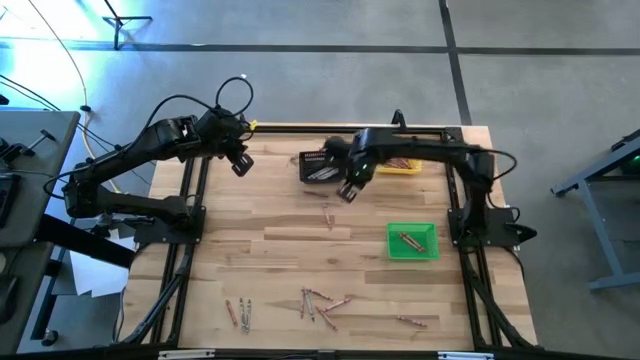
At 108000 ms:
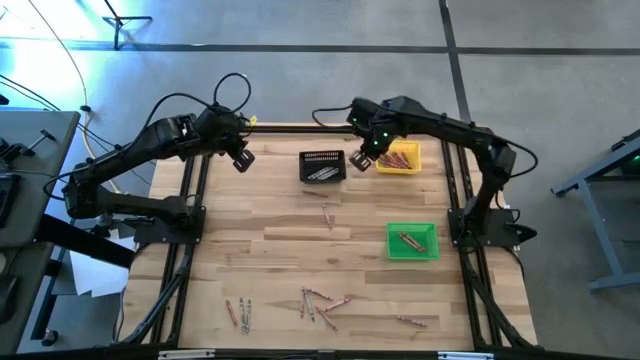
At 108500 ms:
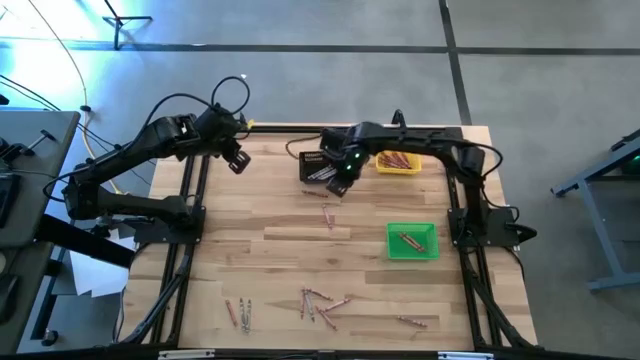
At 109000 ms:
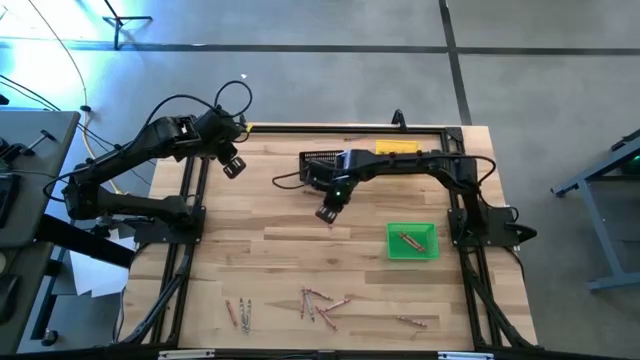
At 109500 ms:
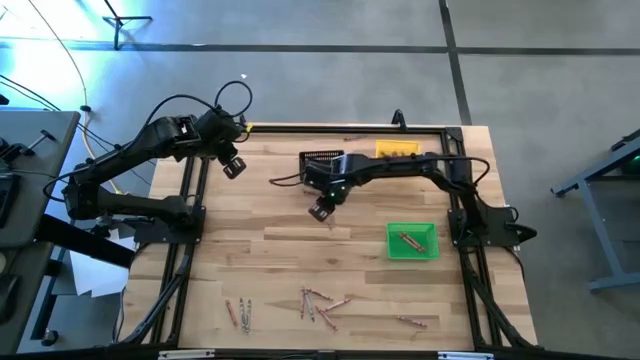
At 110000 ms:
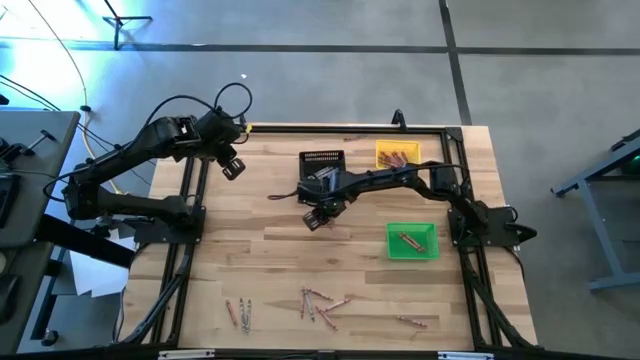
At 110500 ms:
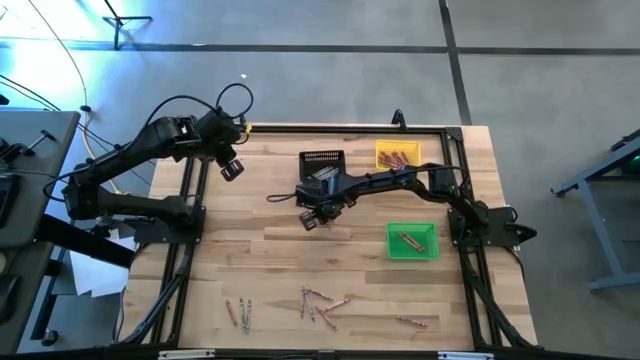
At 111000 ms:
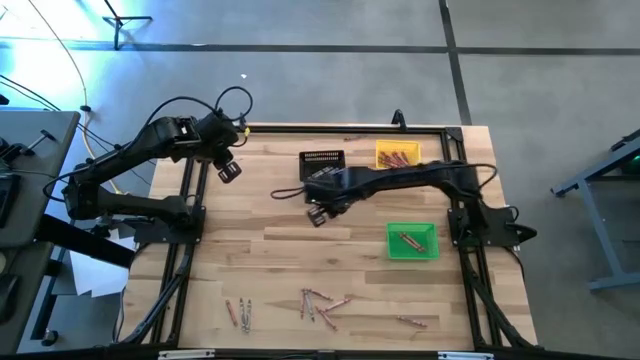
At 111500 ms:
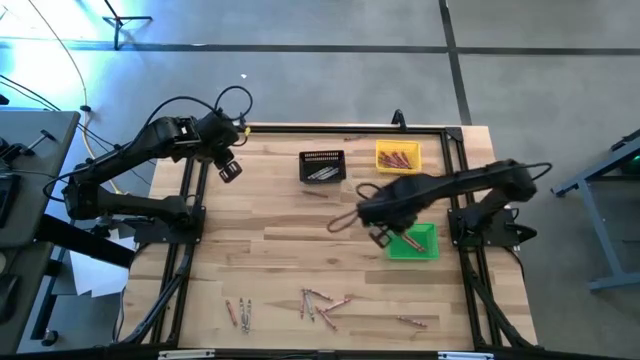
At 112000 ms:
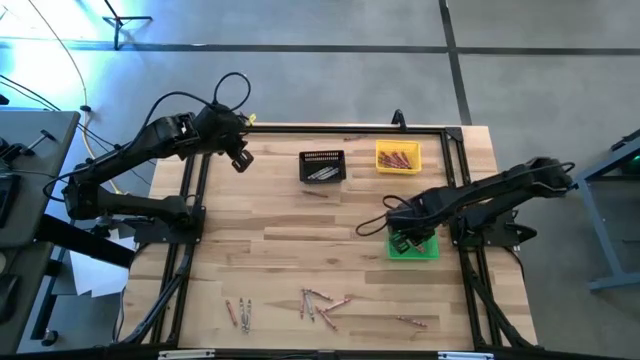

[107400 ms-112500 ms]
Task: Sort crayons
Put the pink crayon into the green basket

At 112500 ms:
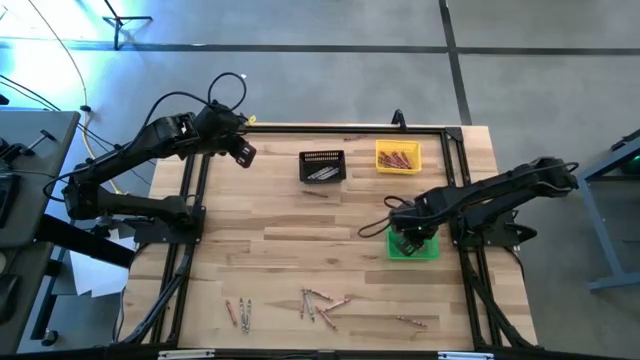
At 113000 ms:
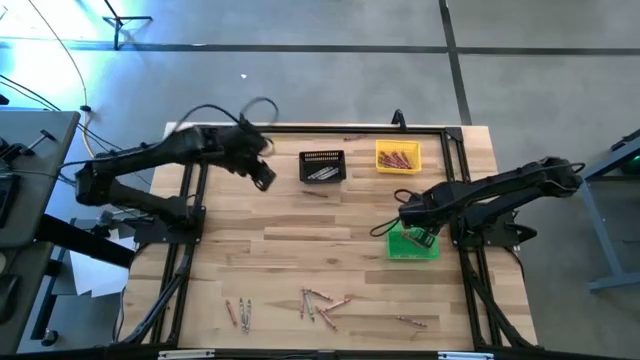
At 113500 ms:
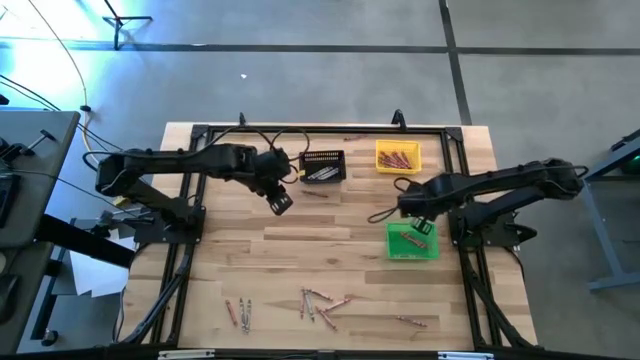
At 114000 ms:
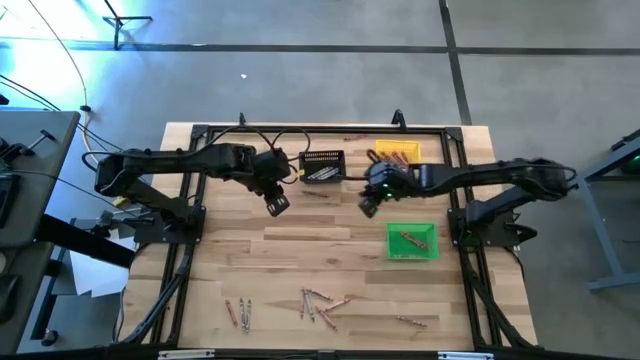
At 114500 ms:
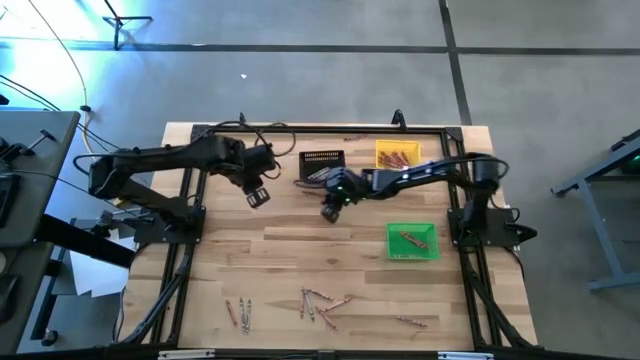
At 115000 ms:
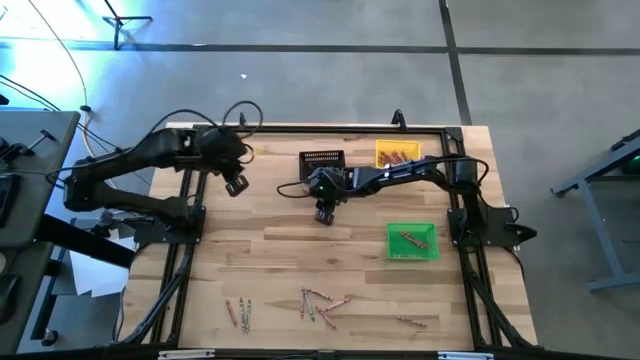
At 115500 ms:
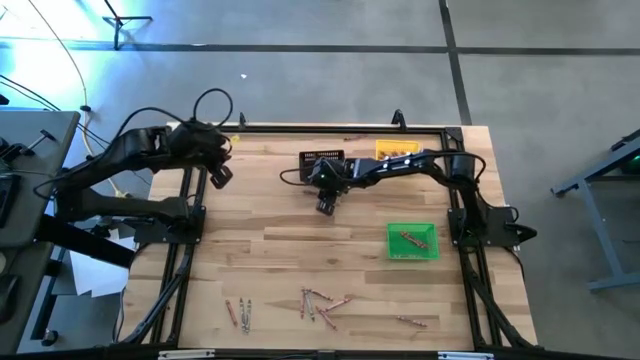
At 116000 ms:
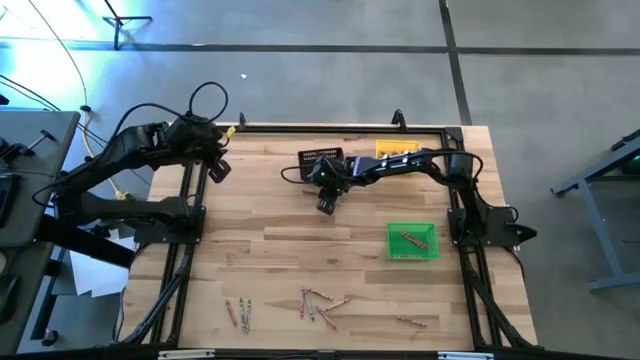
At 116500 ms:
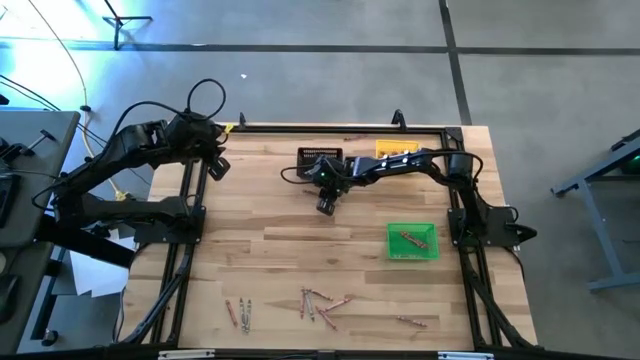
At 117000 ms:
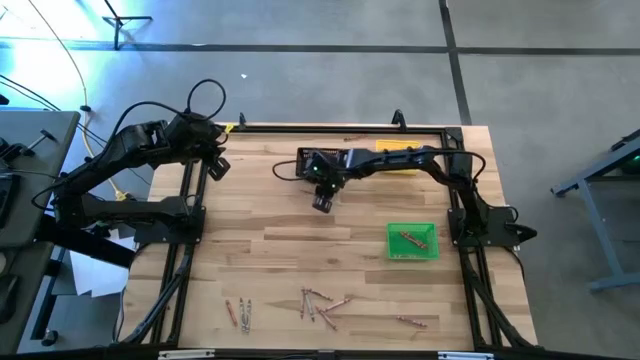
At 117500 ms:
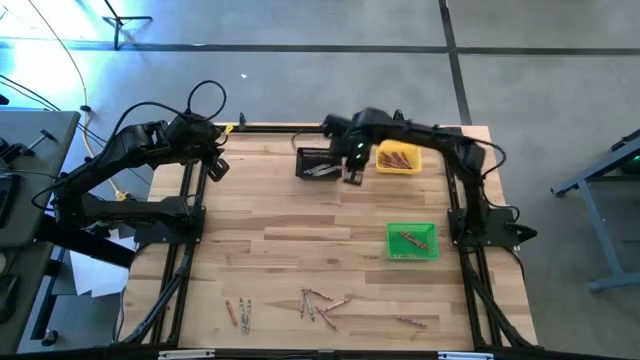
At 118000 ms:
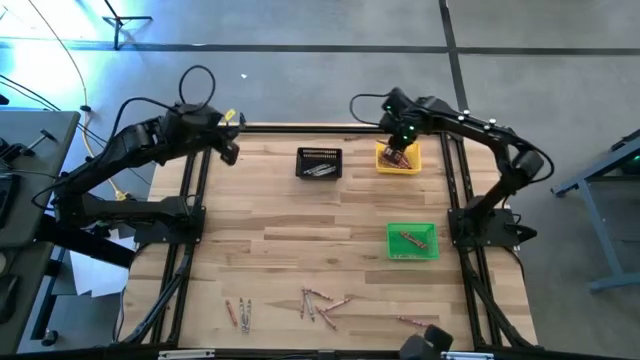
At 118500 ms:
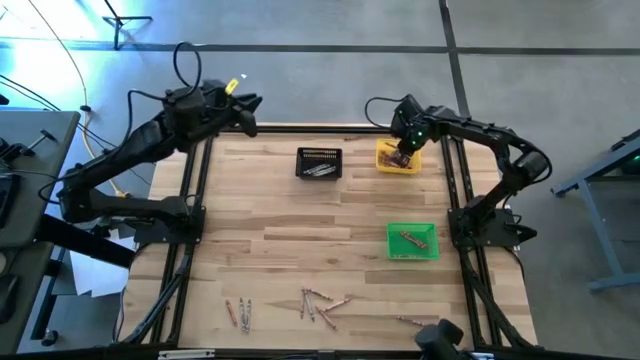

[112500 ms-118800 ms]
Put the red crayon into the yellow basket

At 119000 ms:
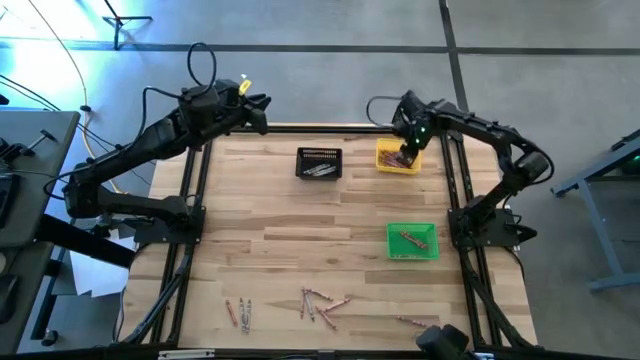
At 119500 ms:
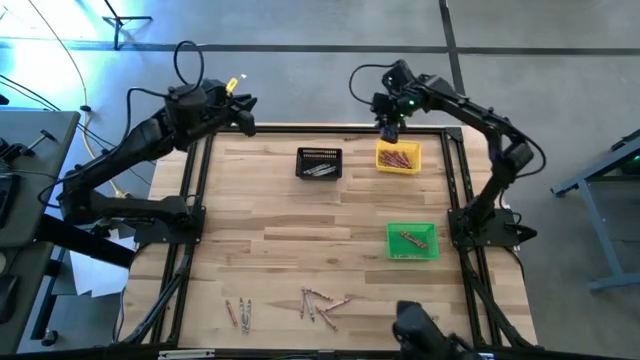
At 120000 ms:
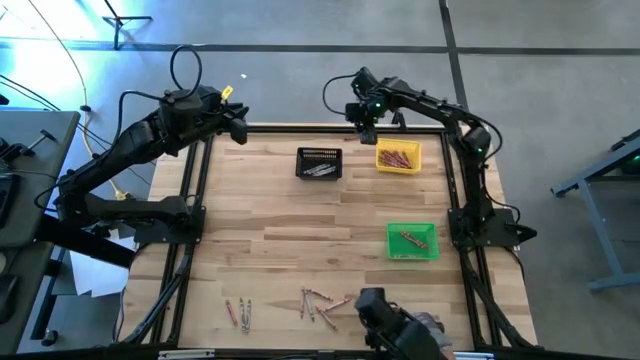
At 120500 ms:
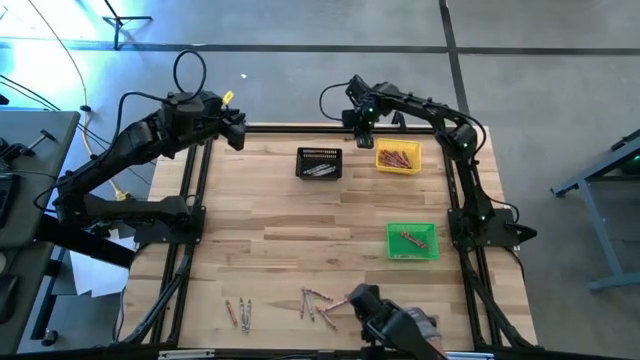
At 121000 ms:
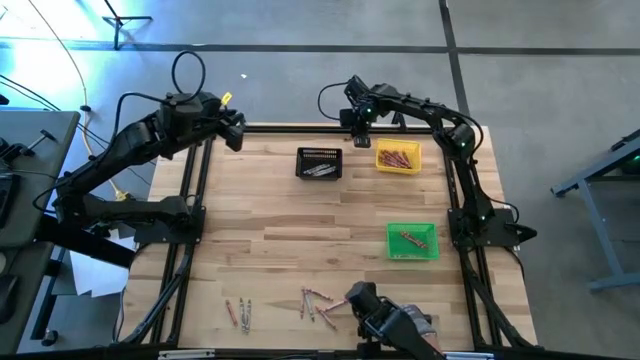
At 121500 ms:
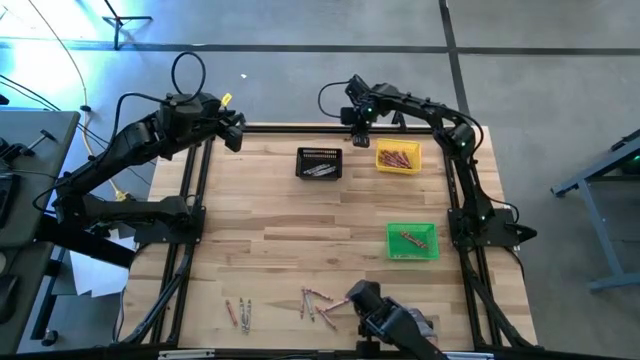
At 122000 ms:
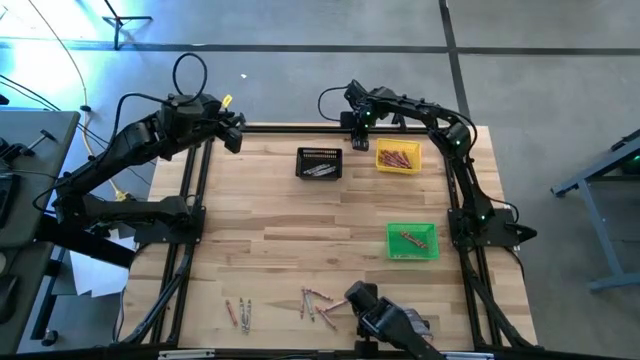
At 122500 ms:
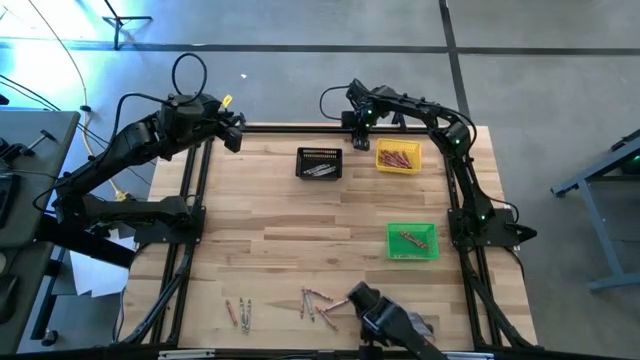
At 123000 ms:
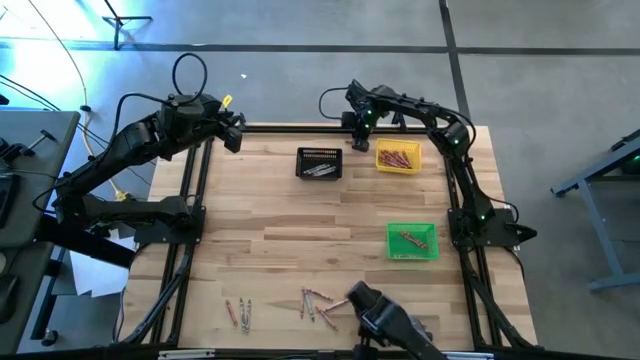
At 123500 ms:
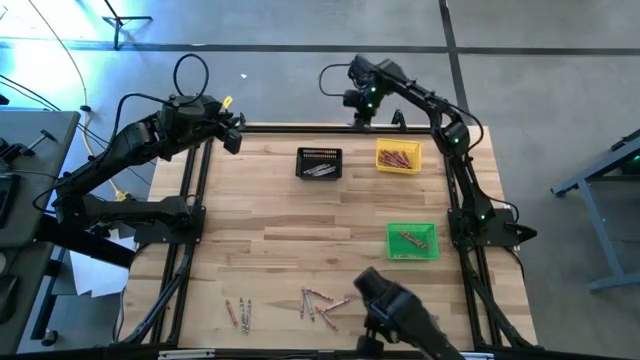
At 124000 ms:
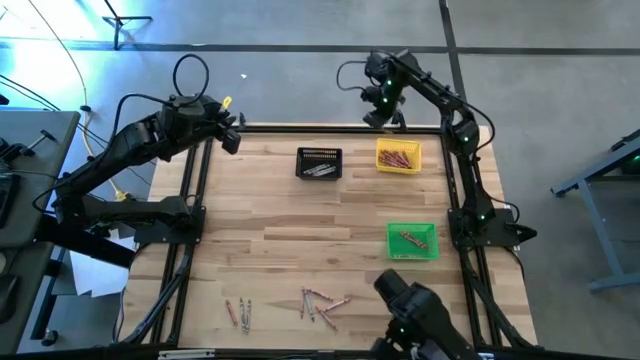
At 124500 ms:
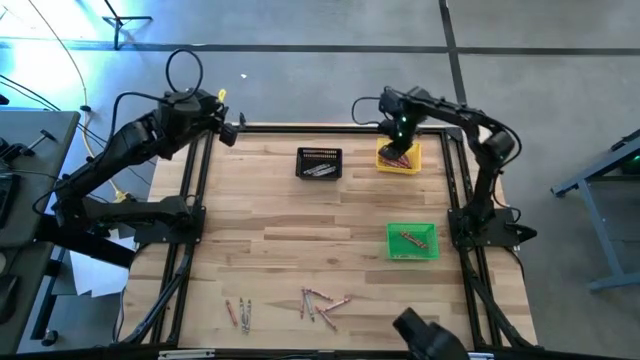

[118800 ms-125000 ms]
Put the red crayon into the yellow basket

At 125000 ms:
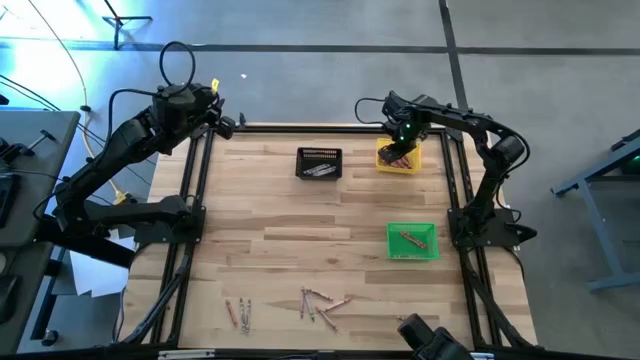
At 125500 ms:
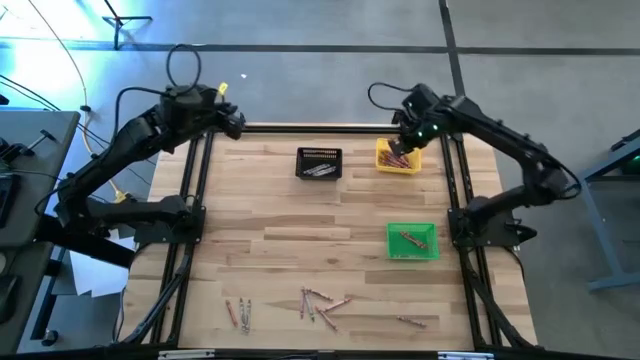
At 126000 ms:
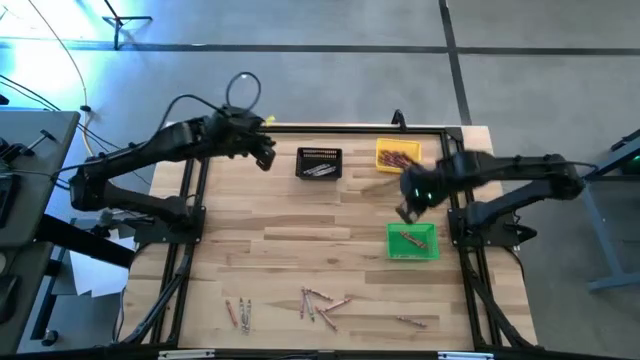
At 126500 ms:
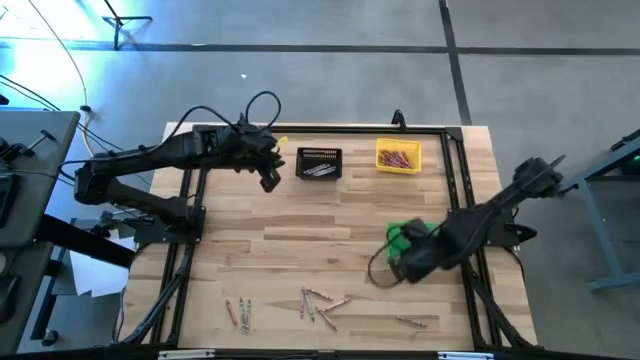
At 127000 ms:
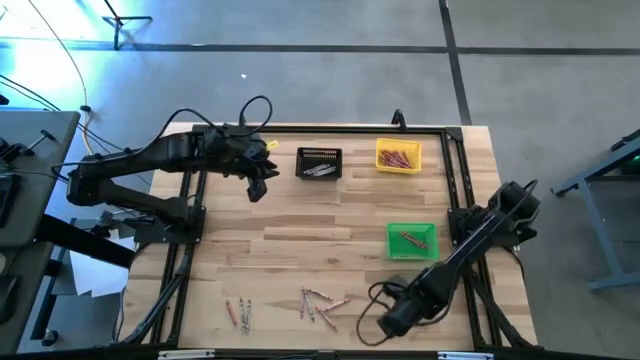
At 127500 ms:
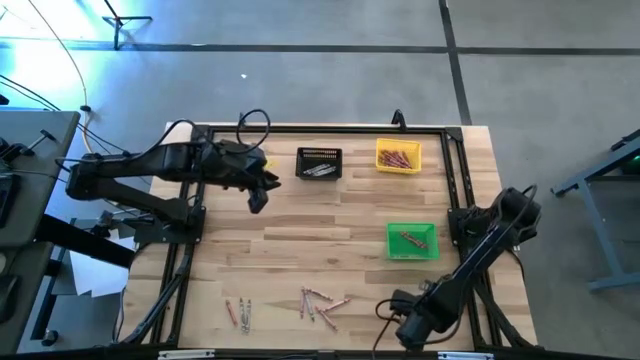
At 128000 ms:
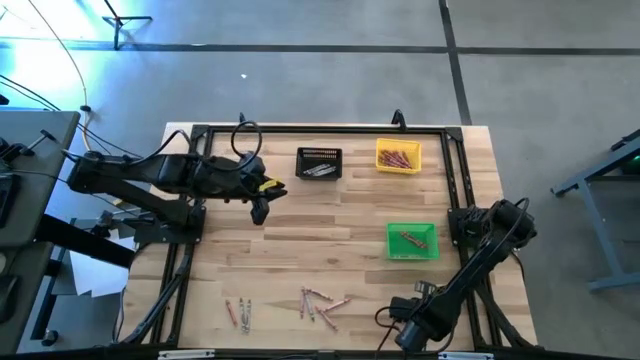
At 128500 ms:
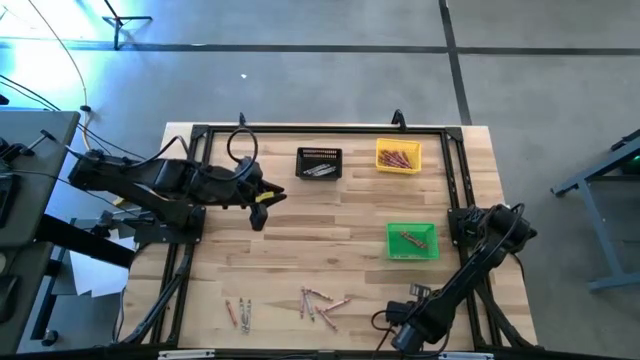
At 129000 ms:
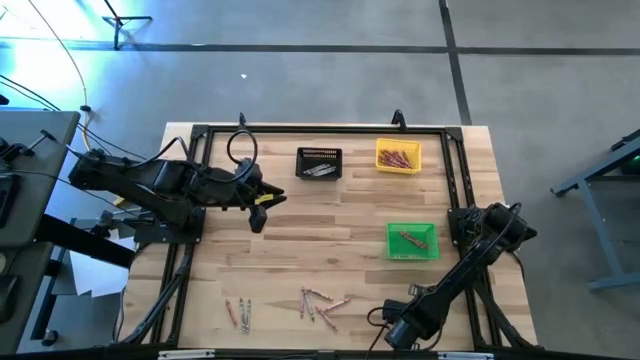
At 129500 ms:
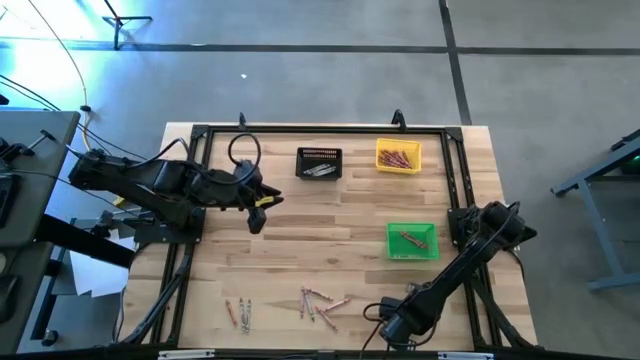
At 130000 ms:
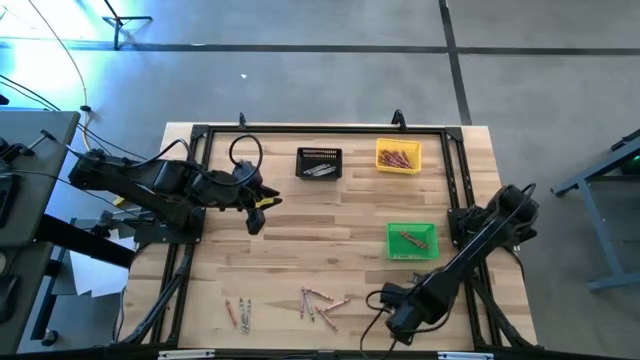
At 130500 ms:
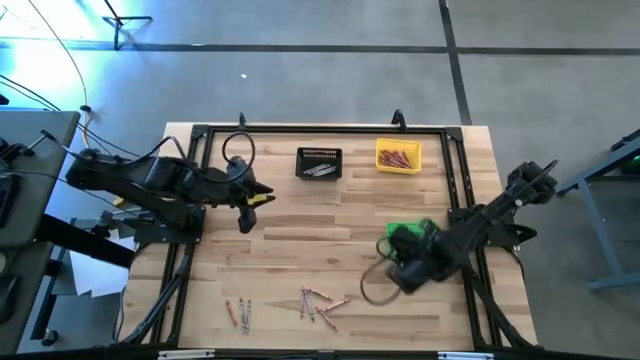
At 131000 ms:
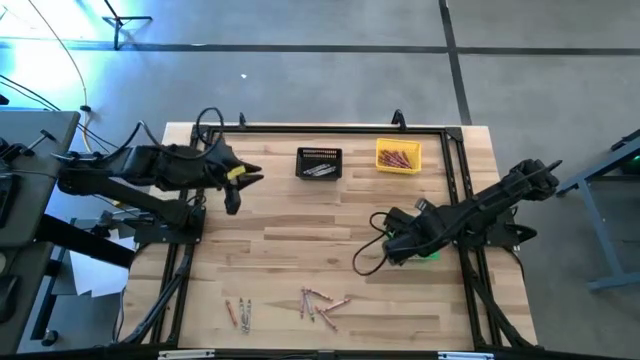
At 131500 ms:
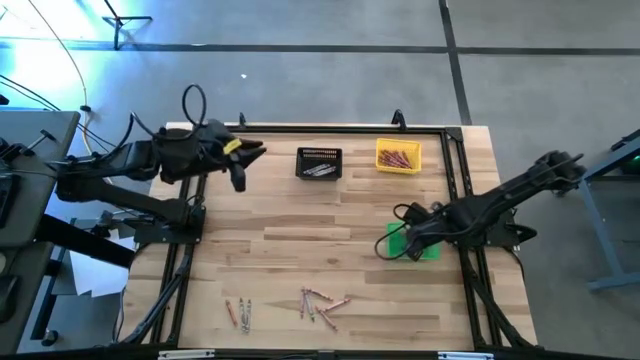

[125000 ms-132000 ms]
Put the pink crayon into the green basket
